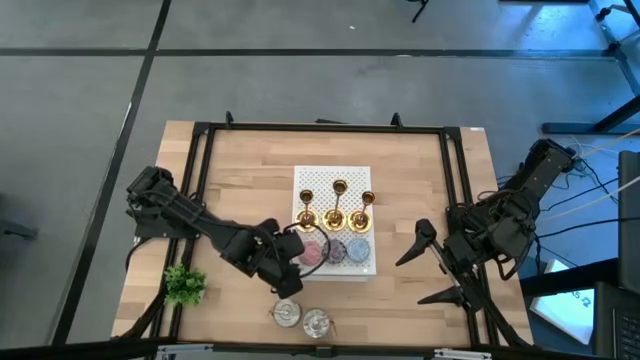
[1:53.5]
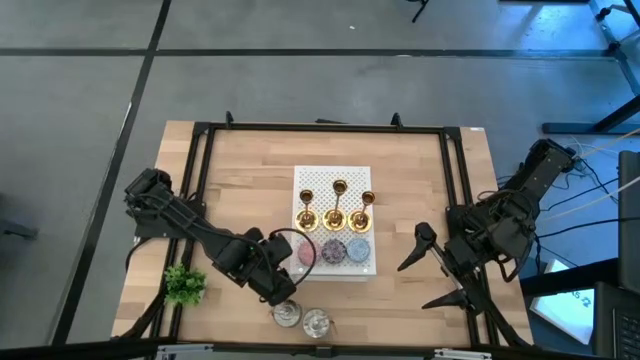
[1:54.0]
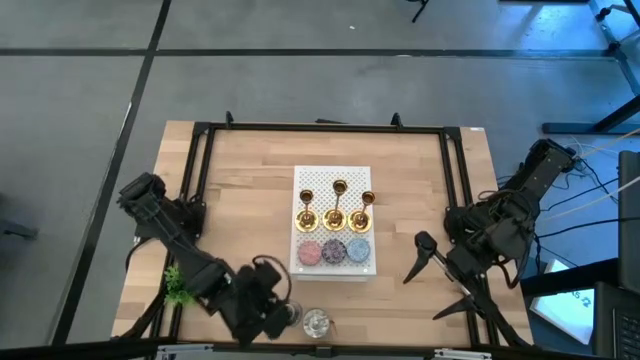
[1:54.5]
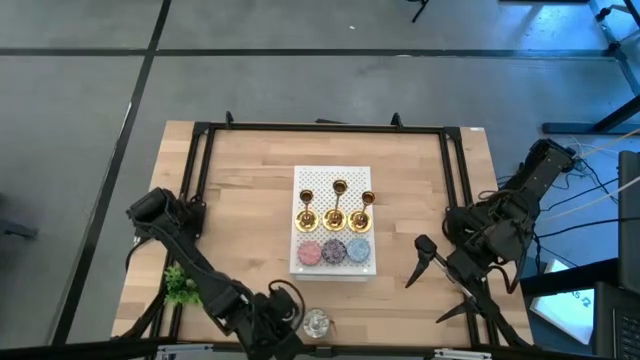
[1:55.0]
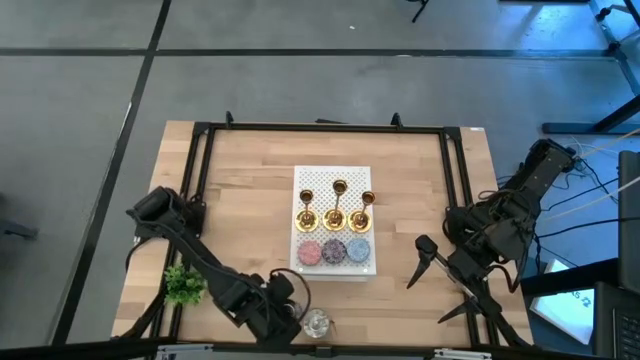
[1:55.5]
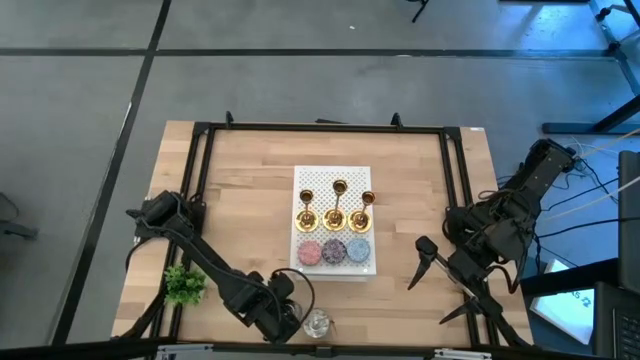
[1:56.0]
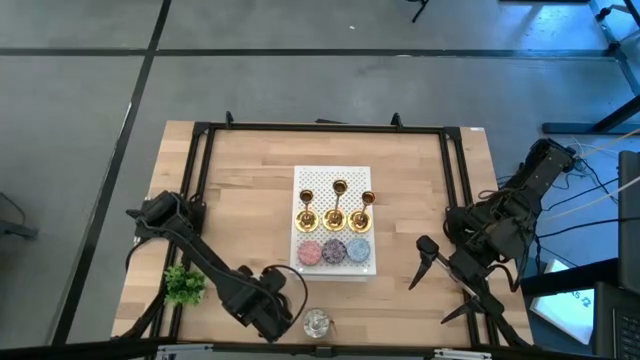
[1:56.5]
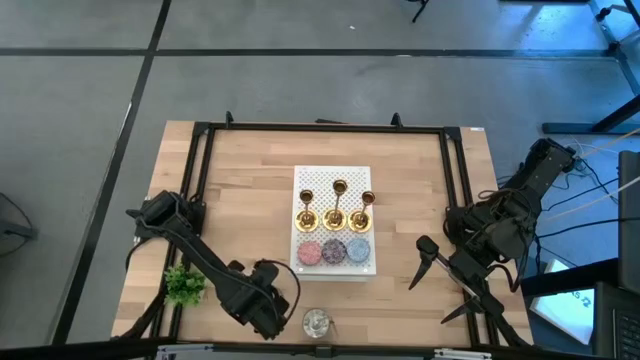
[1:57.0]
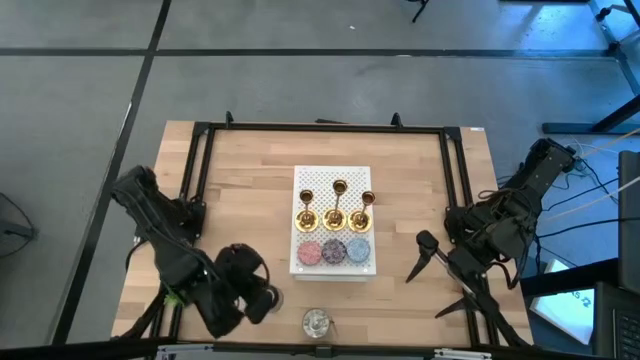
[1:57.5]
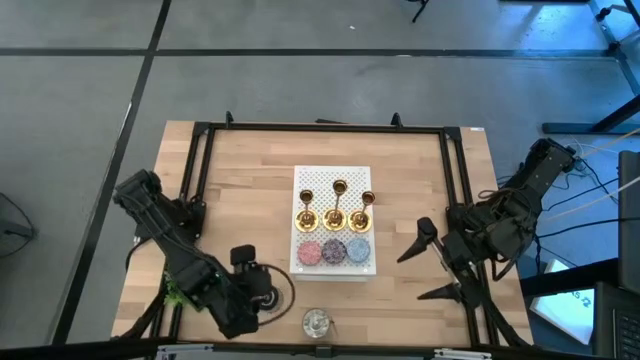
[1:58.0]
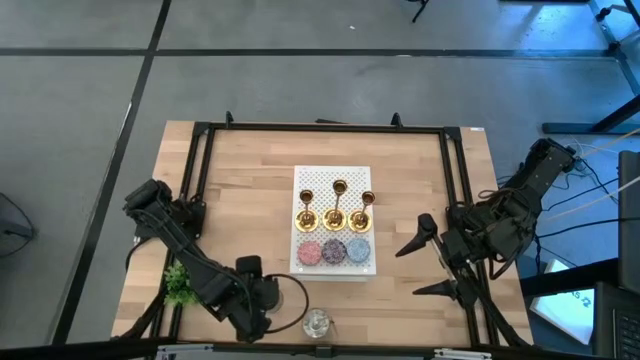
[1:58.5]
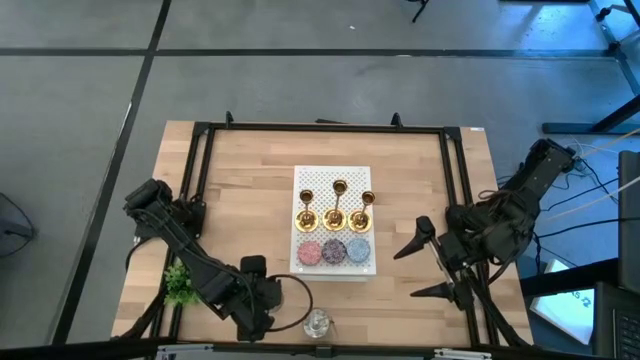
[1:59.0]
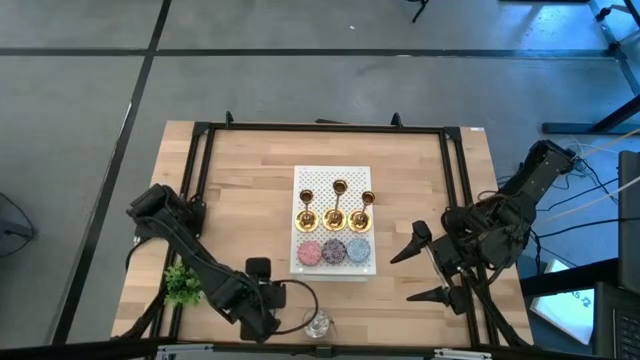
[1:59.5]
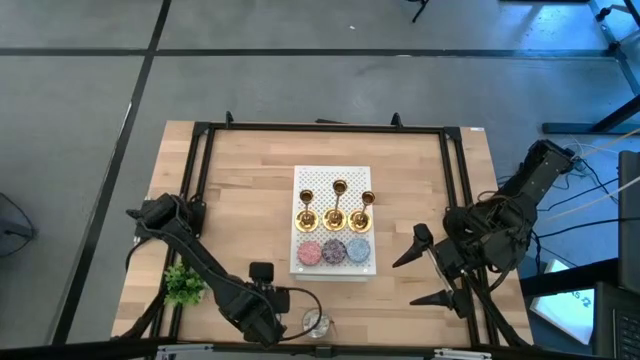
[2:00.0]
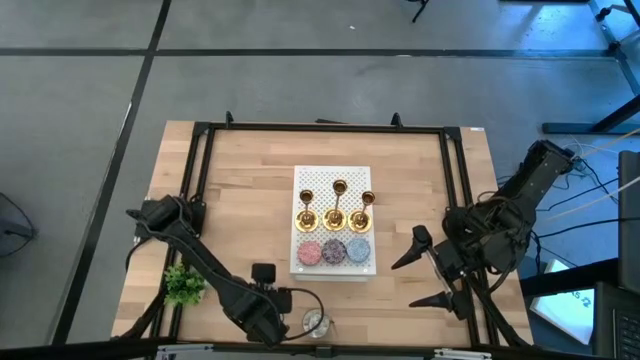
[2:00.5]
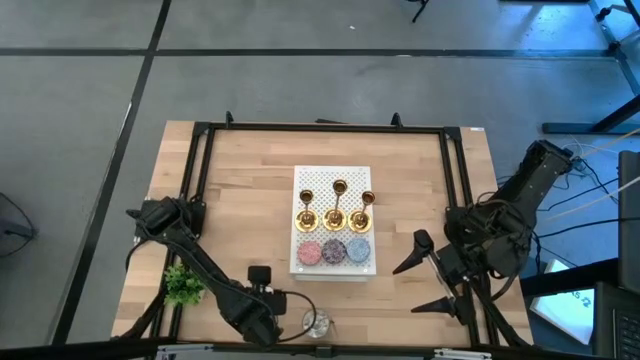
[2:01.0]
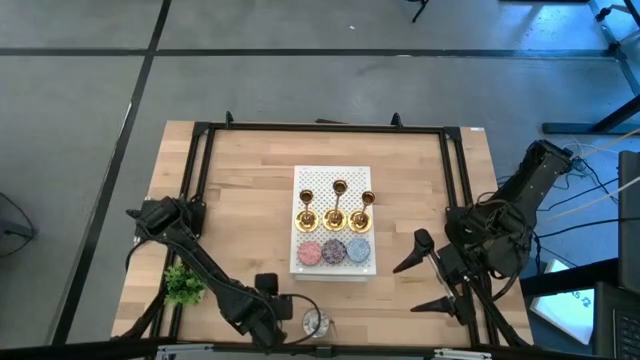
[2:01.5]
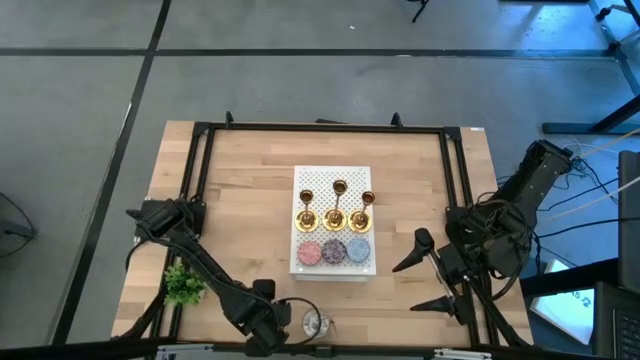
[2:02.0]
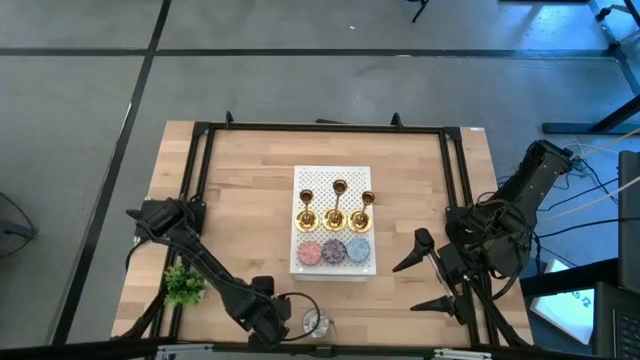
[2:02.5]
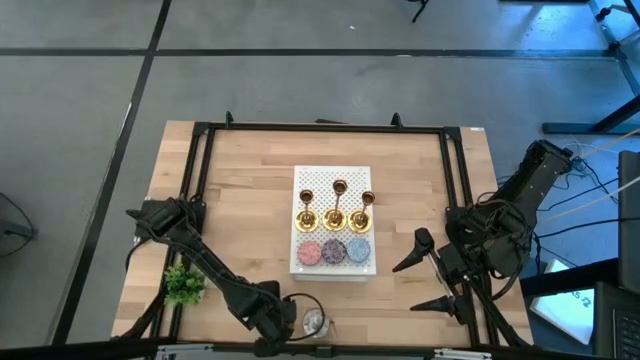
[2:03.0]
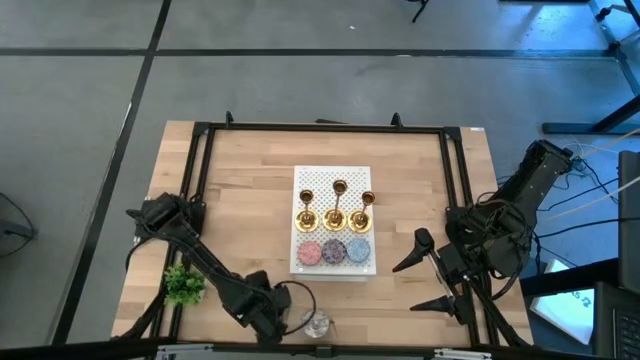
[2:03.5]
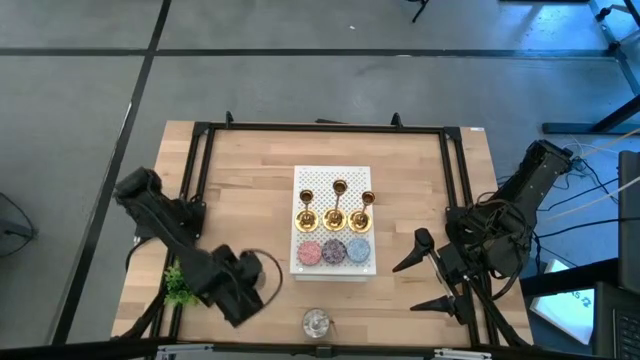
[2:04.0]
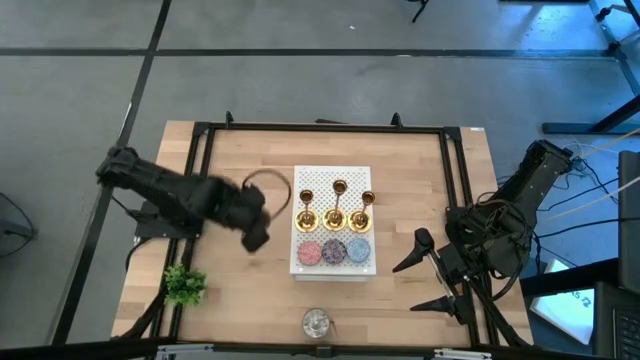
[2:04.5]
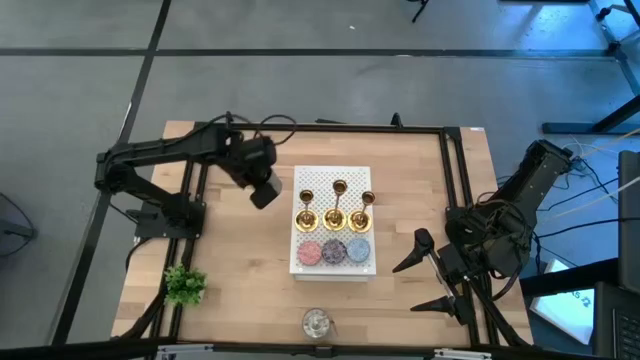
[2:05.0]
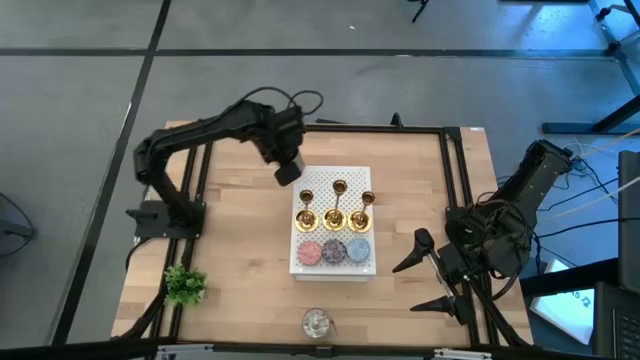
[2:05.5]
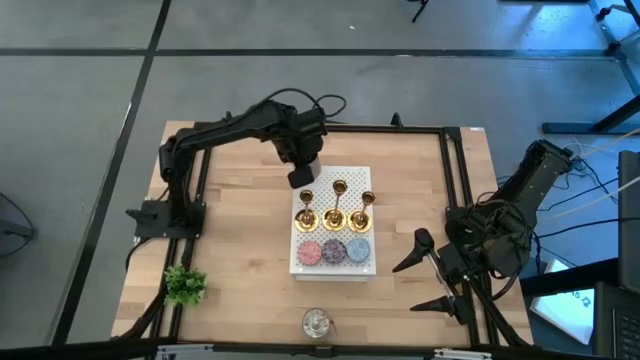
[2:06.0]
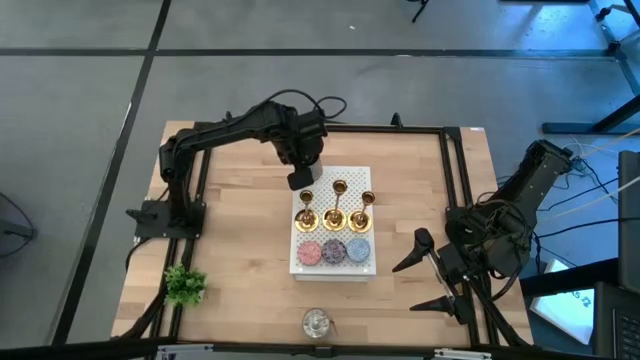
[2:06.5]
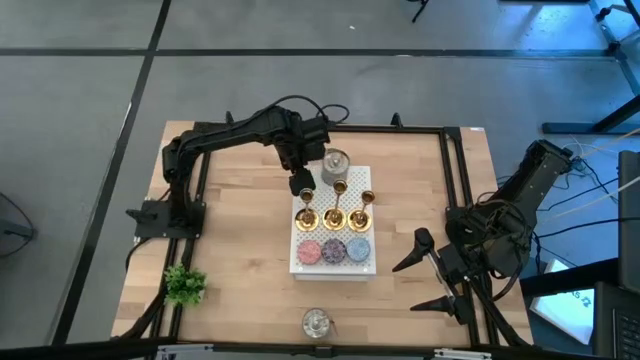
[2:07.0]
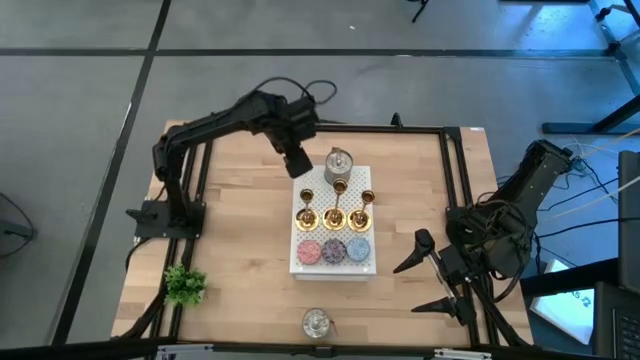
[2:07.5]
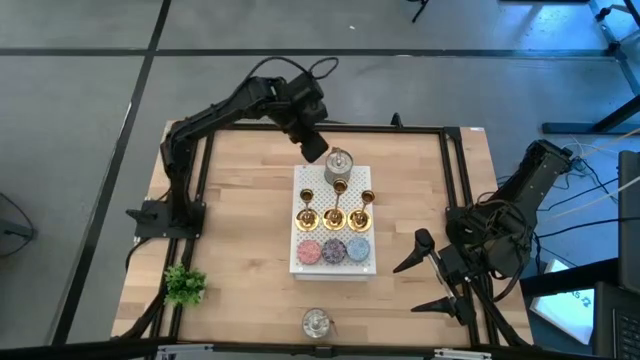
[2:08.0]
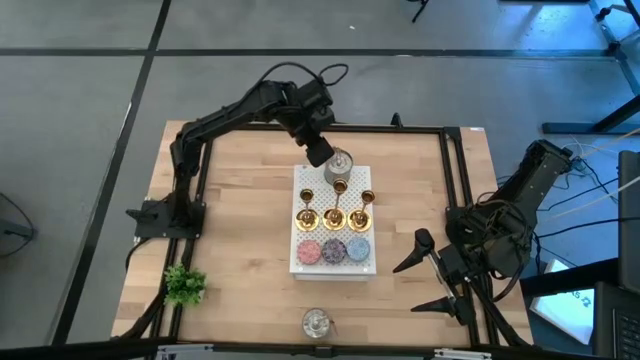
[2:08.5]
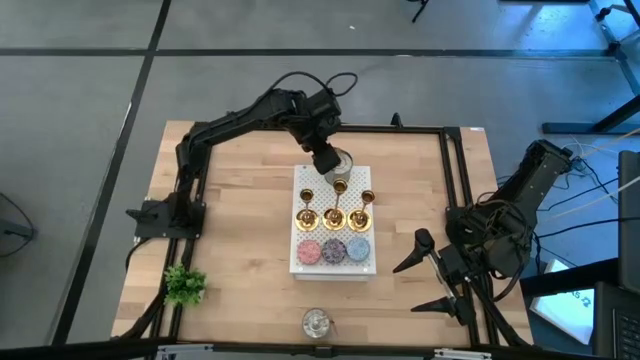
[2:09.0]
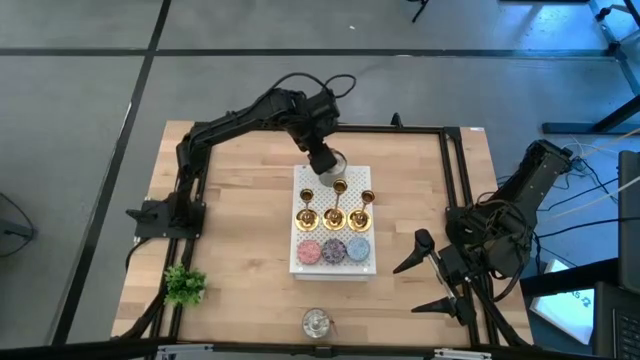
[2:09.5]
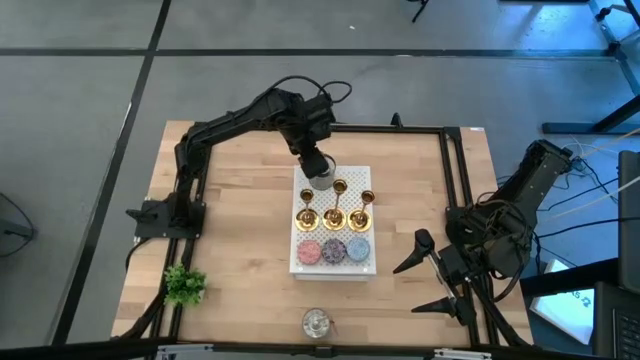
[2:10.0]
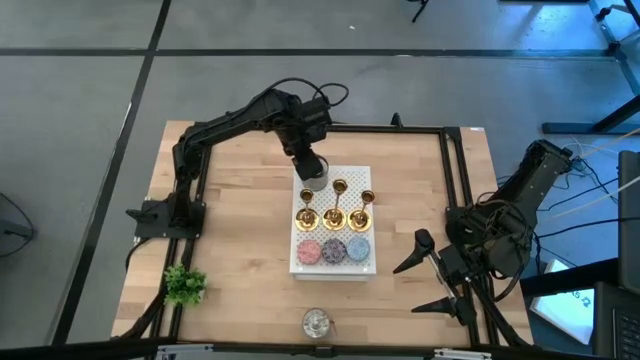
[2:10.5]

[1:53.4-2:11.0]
Task: Pick & Place candle stick holders
Put the left silver scented candle on the shelf

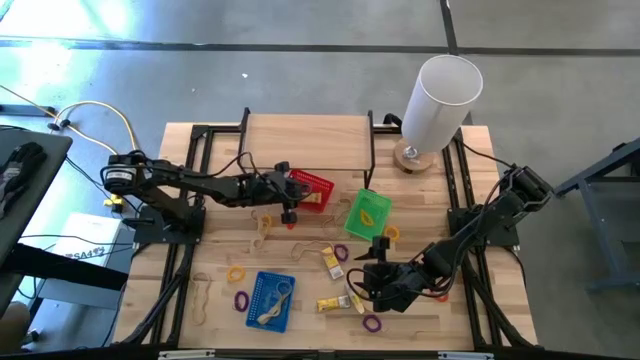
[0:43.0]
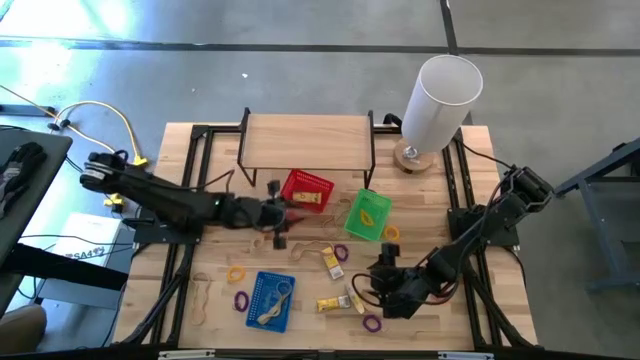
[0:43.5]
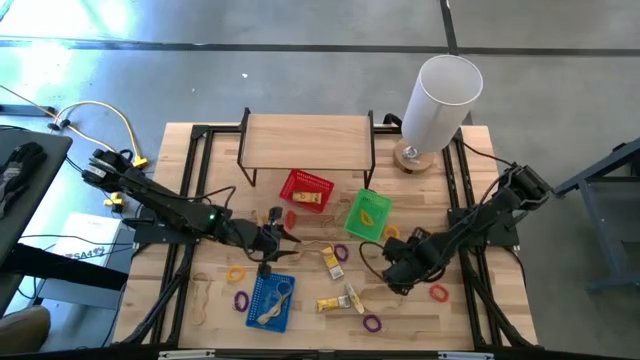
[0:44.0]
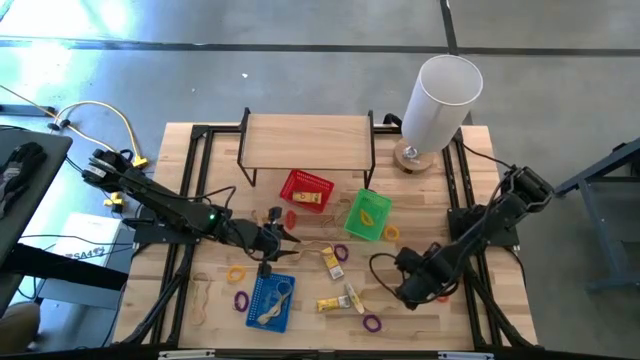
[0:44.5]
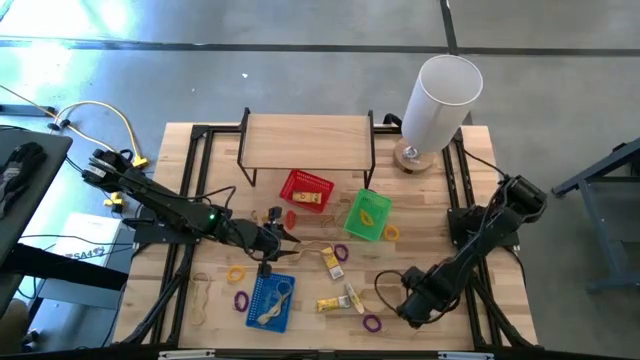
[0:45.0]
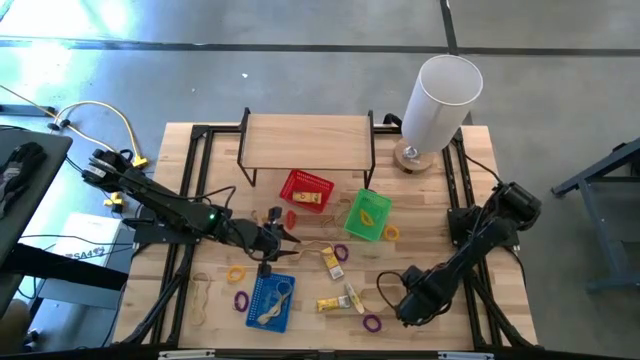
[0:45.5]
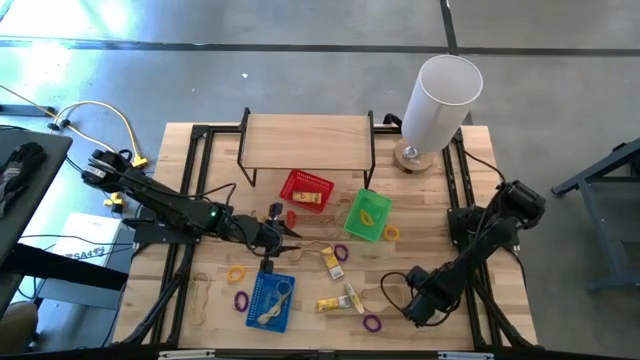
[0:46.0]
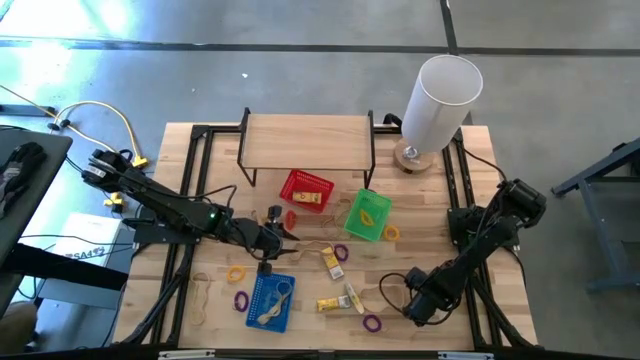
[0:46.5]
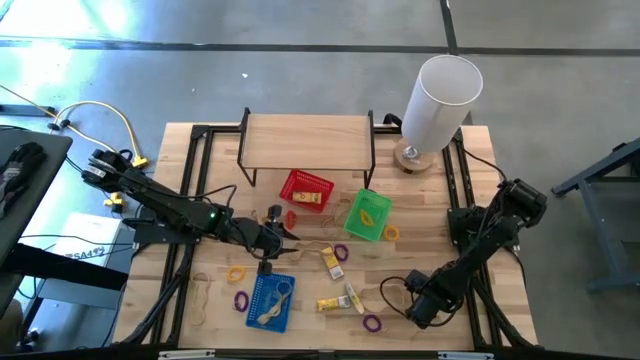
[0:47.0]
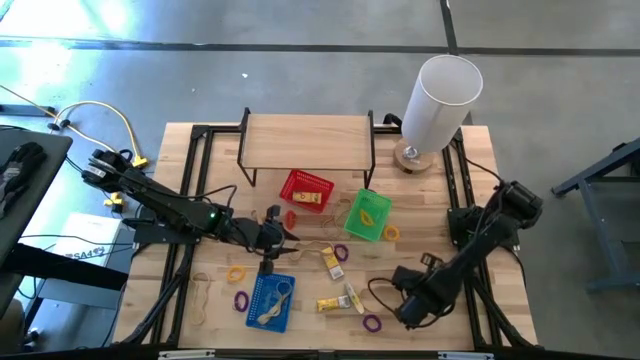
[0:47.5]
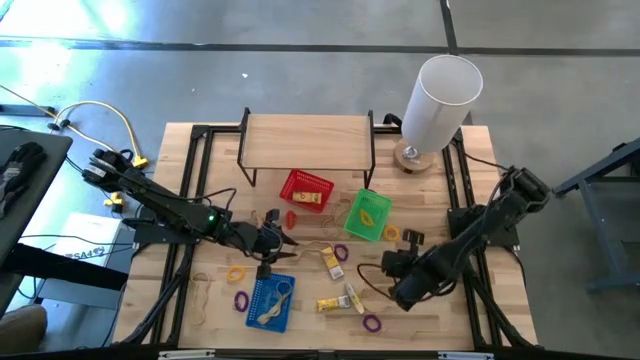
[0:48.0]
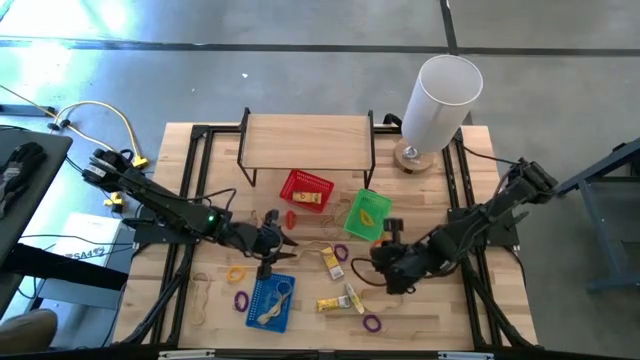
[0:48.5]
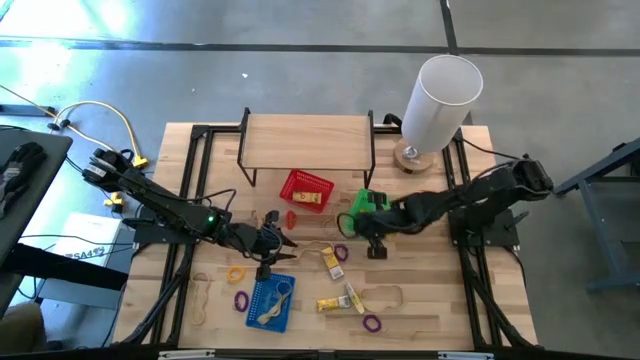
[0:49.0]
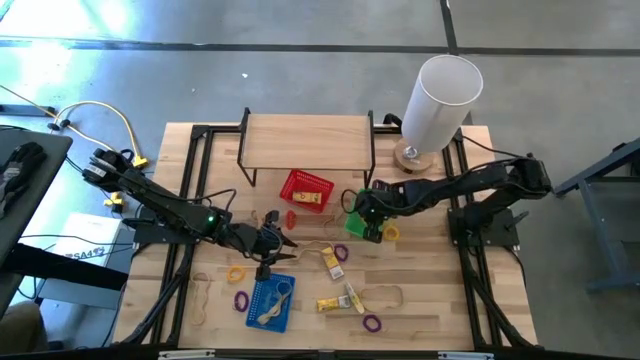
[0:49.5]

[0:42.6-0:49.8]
Task: Pick & Place Office Desk Supplies
Put the orange spring keychain into the green bin
